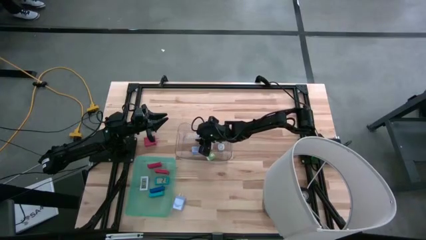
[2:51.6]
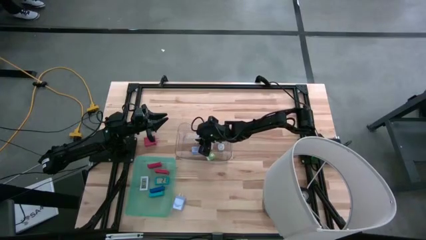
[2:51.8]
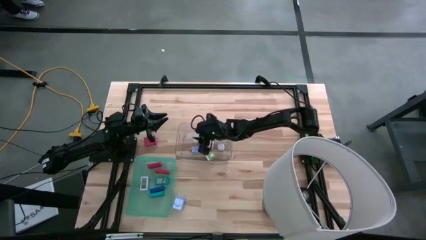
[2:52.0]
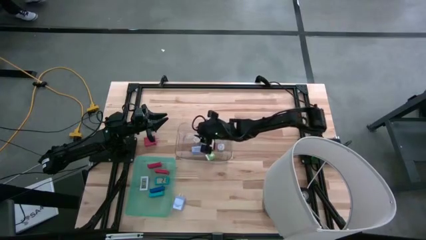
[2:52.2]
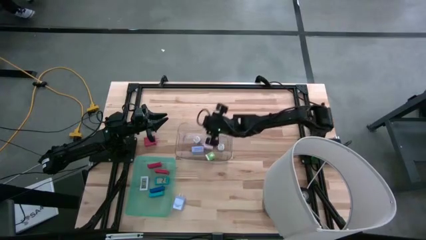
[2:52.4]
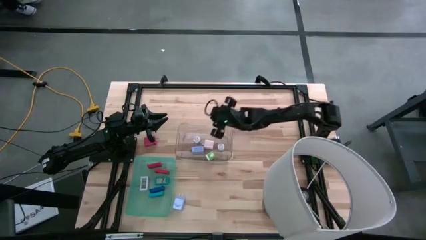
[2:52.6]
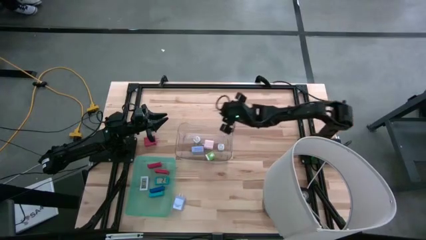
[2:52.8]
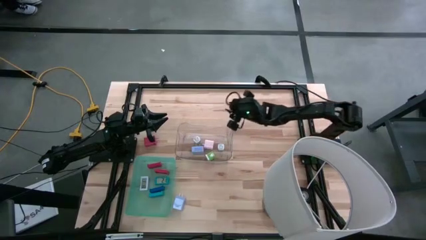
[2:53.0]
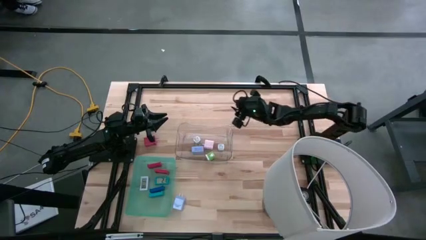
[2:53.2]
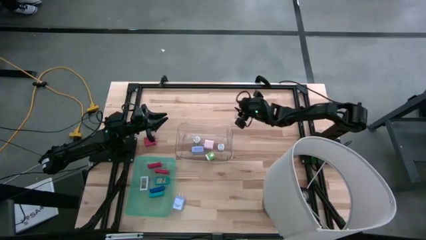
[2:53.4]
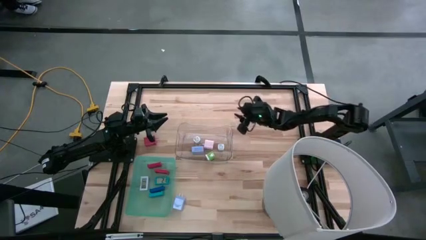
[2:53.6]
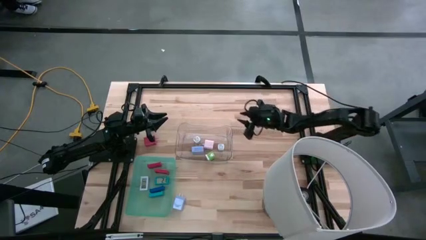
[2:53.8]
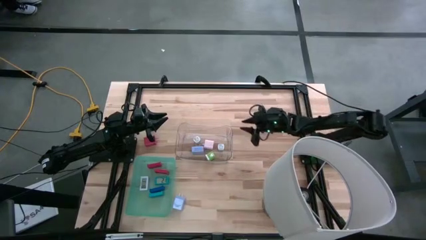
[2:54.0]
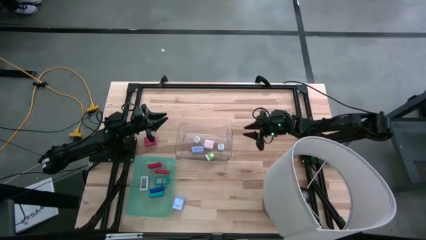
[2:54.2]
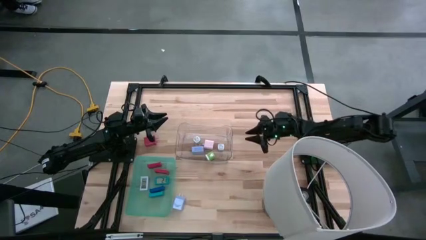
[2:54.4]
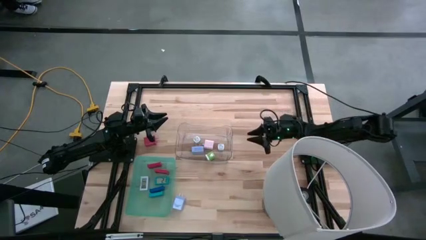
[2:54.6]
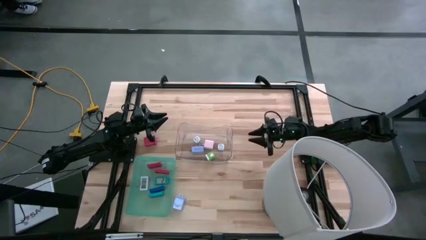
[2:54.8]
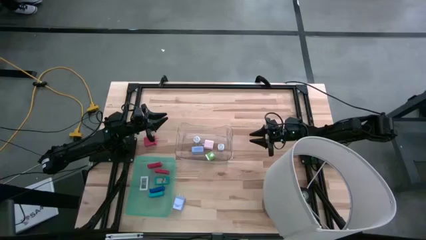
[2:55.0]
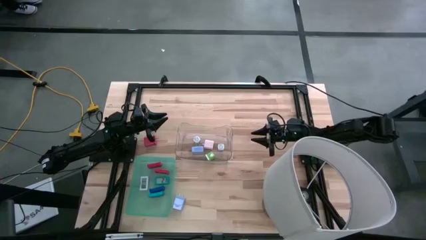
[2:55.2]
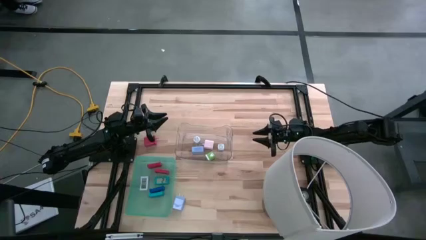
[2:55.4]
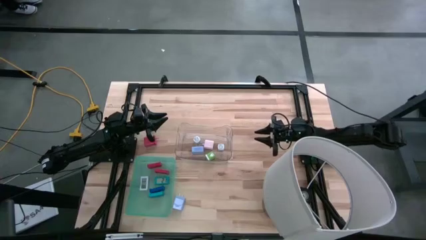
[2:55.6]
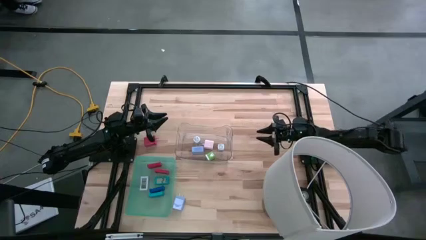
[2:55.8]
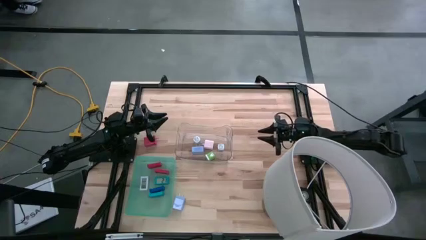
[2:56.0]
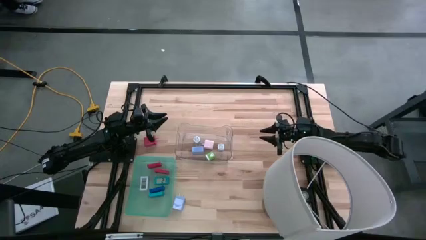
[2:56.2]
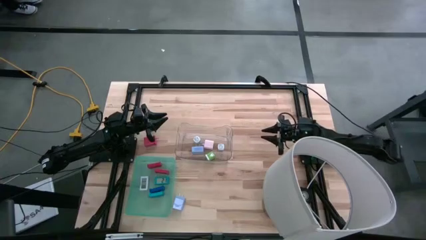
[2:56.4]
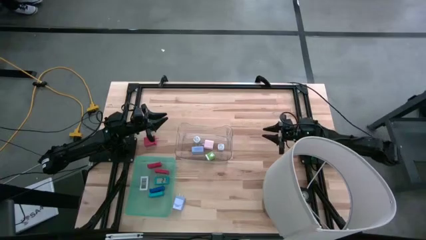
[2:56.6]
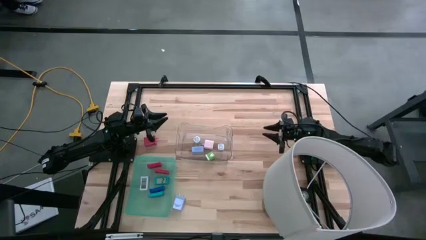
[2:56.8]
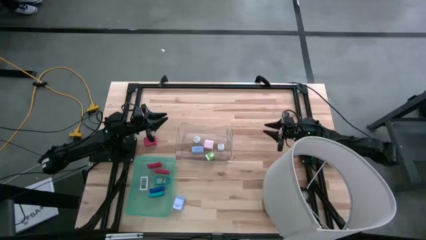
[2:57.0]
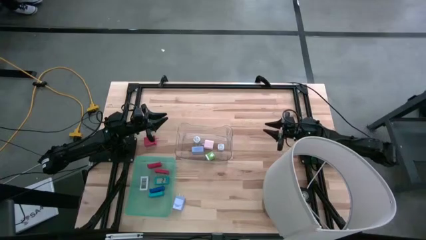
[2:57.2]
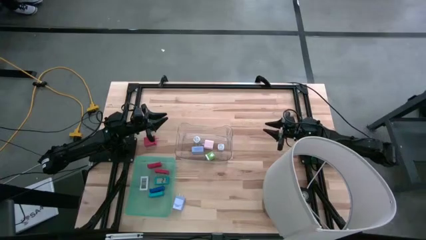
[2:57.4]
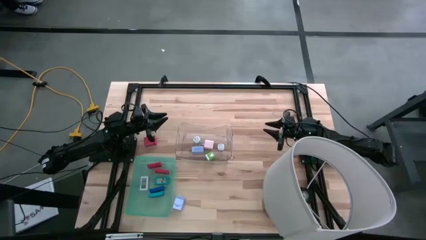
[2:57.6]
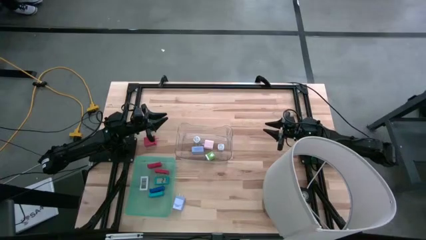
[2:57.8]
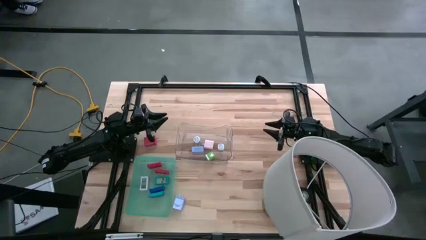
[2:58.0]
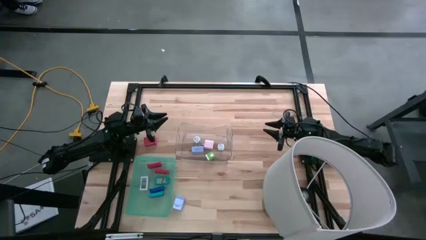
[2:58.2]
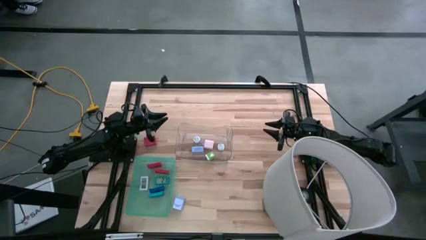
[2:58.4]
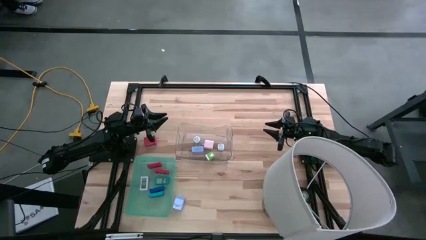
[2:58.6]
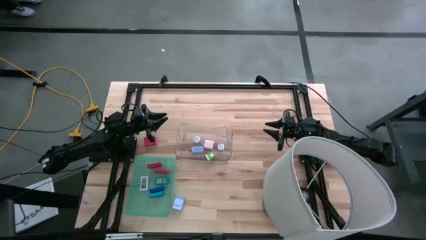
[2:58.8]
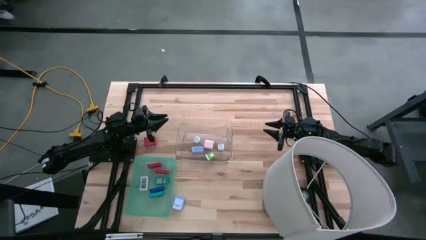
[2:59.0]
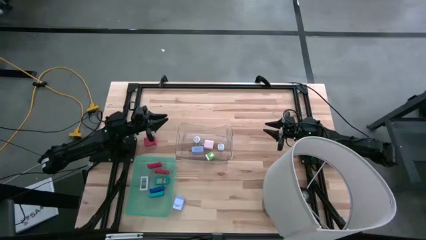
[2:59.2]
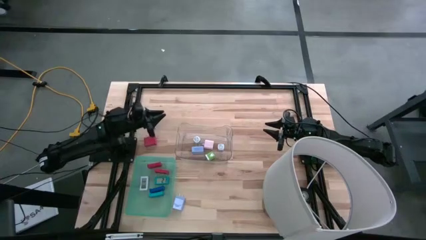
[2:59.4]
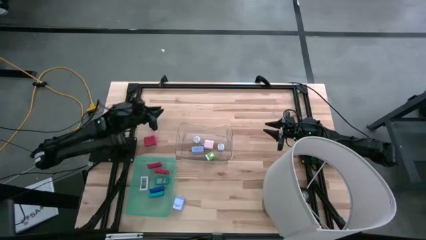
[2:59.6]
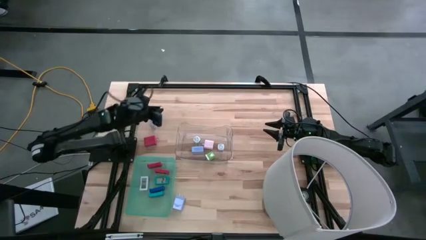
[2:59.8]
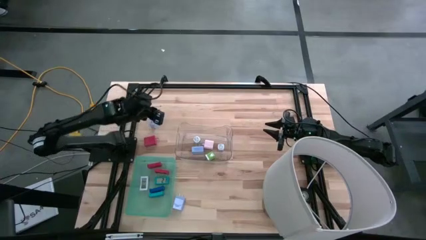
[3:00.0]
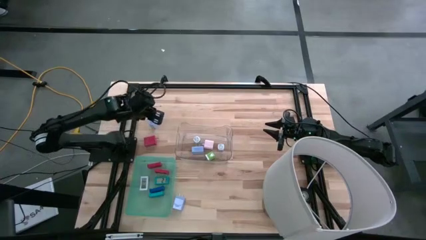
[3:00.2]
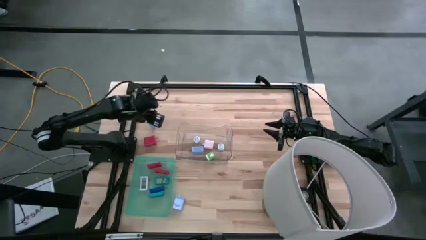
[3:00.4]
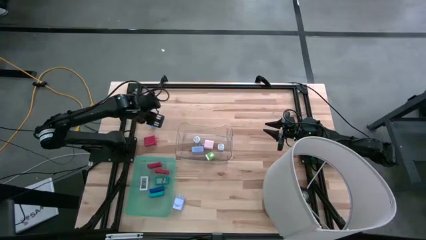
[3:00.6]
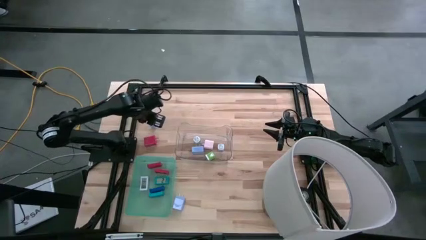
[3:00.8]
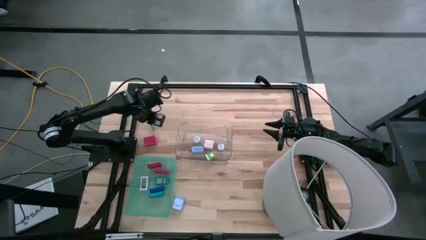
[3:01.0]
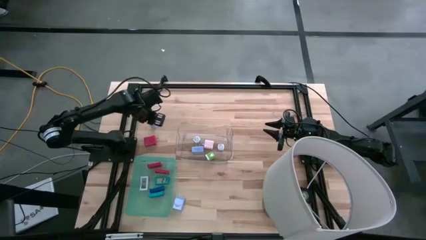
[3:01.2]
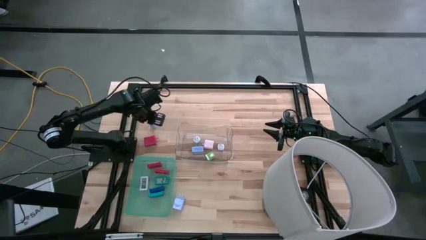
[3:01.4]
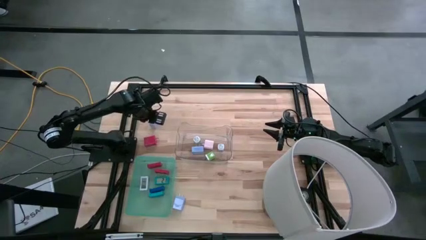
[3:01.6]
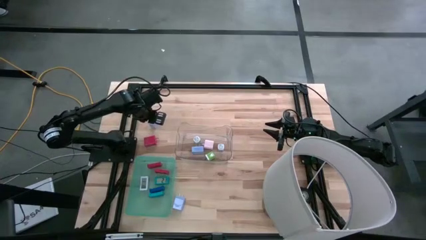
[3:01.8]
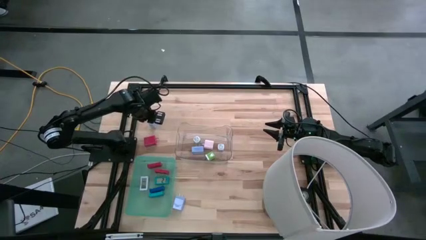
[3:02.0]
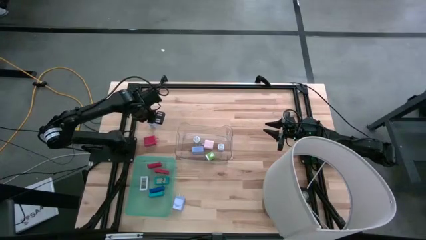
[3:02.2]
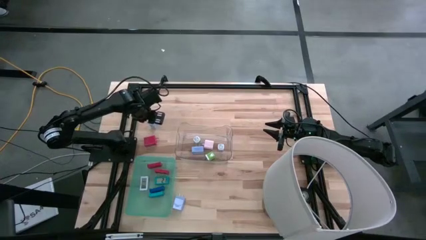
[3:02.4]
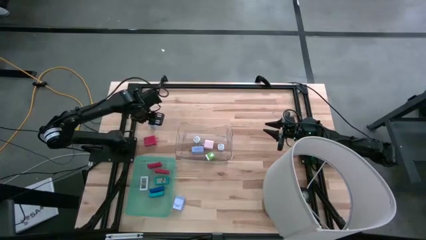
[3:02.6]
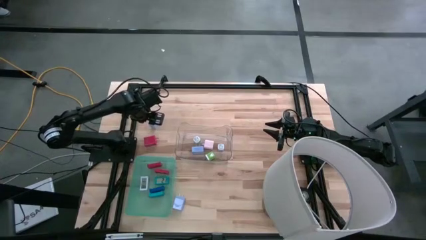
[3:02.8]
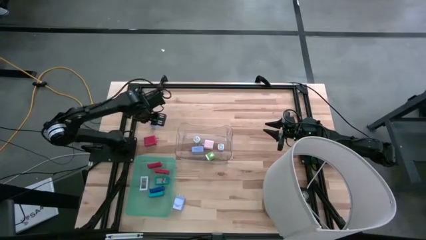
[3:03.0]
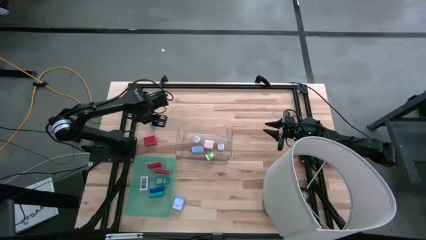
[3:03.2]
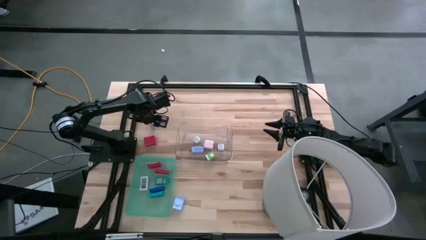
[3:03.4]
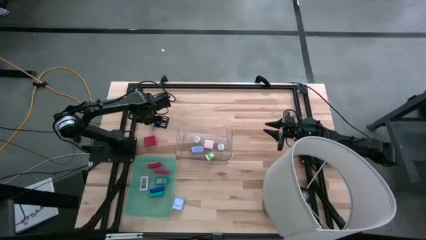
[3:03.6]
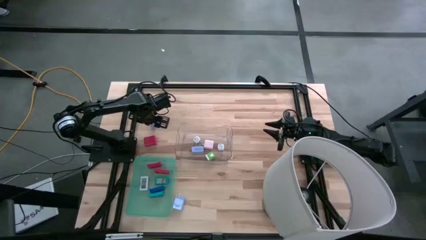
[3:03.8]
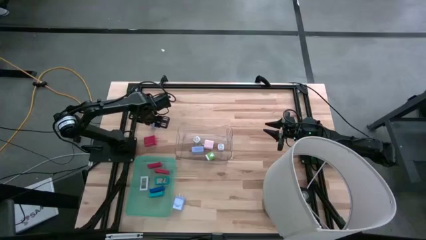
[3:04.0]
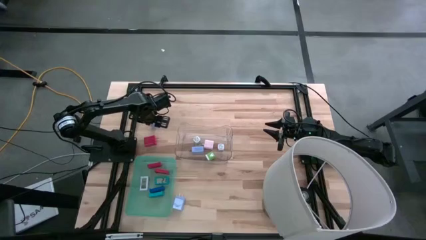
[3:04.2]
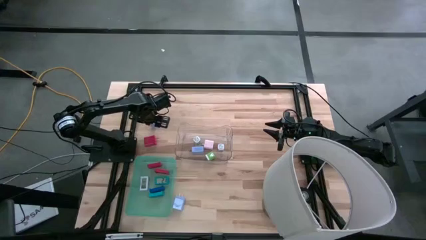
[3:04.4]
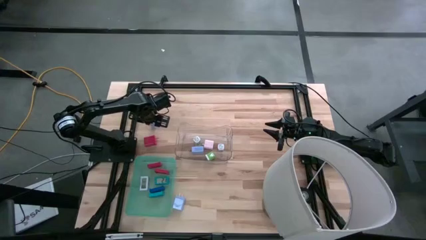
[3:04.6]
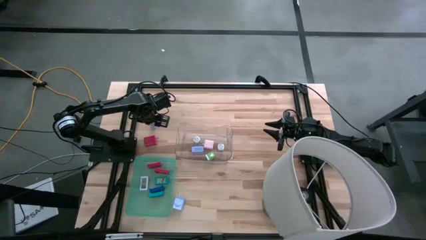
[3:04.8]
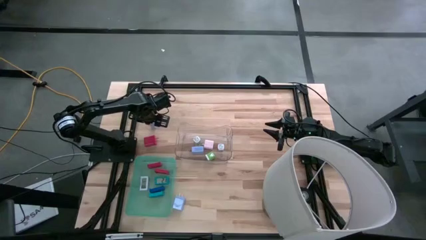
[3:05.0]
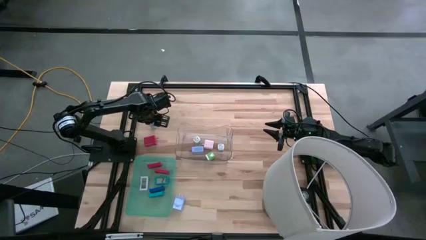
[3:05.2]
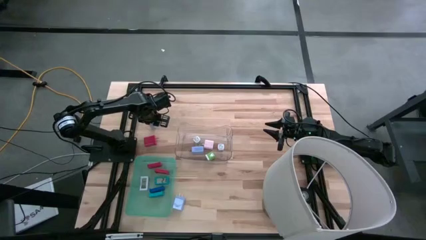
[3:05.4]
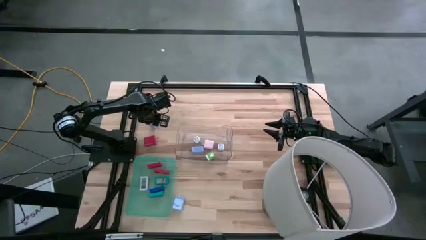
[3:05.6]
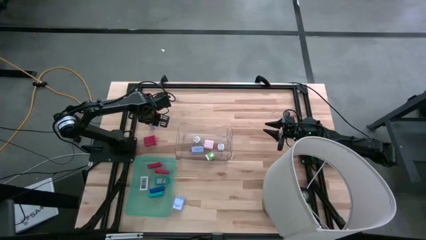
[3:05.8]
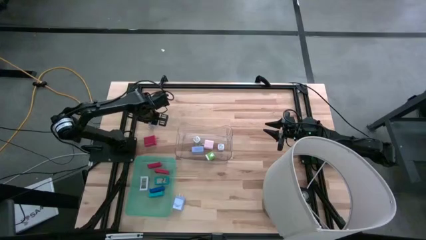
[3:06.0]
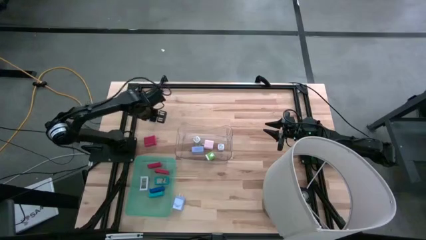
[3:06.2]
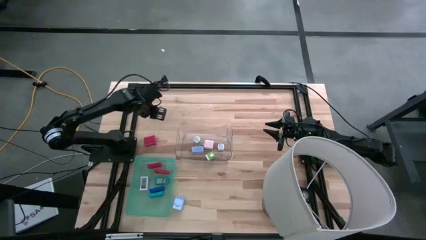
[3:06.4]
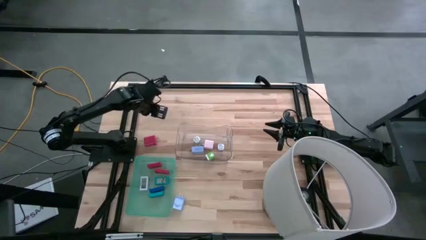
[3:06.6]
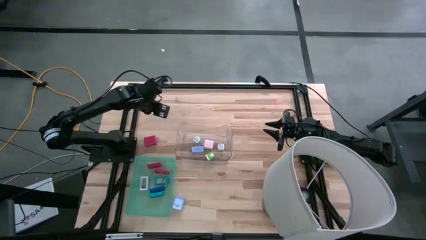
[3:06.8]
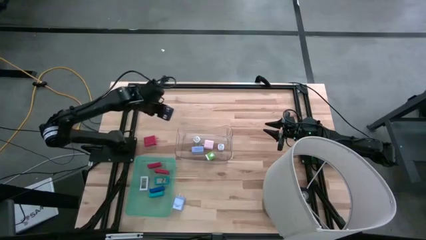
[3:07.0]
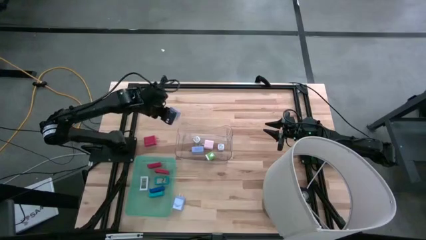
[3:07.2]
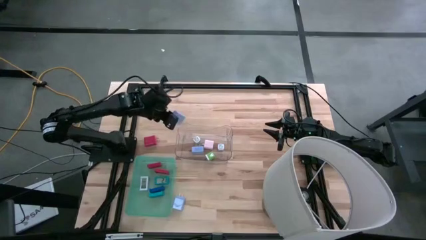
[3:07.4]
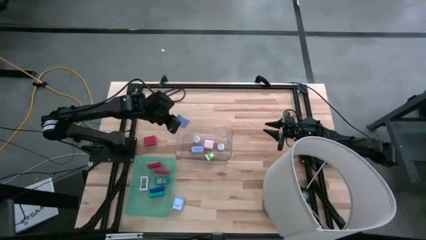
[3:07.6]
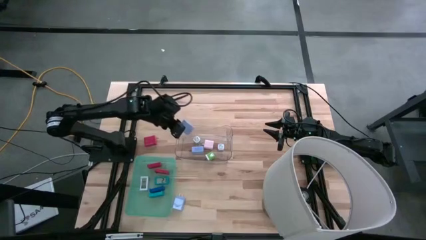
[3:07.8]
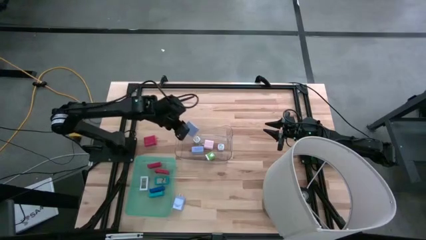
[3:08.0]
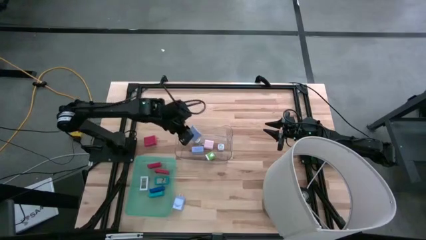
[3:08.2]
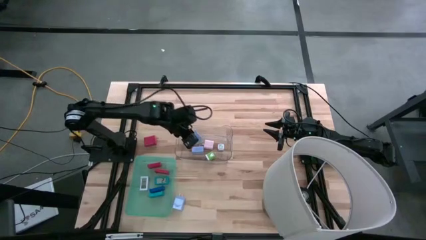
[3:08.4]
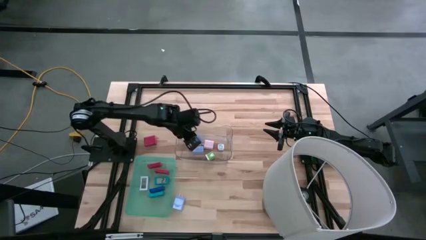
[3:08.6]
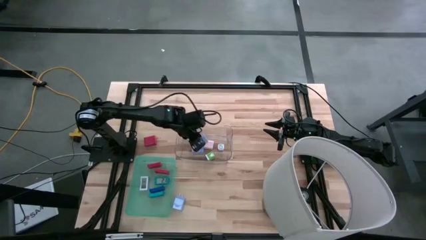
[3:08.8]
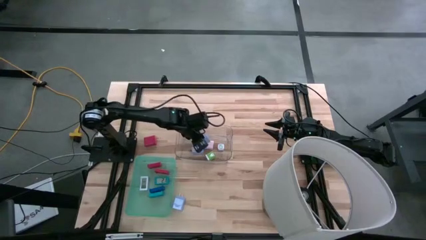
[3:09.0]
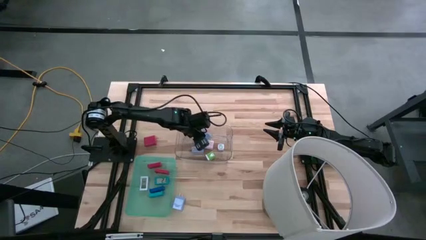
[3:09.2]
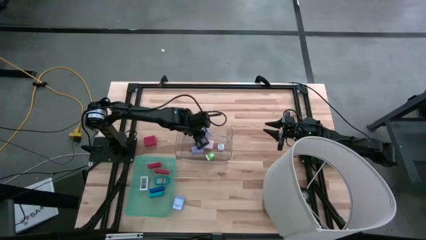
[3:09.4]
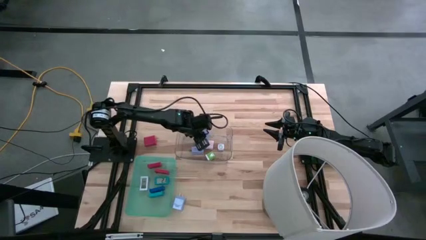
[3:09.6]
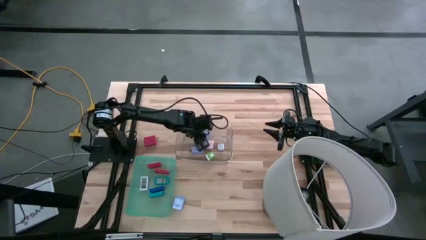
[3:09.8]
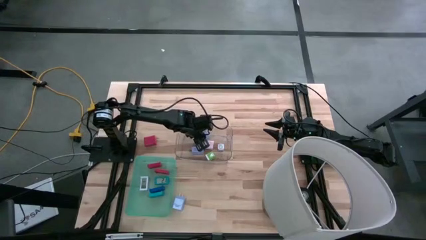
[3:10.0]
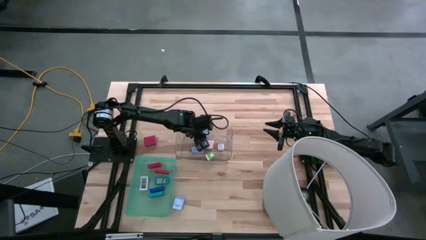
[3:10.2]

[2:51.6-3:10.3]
Task: Pick & Place Office items
Put the top blue charger adapter into the transparent bin
